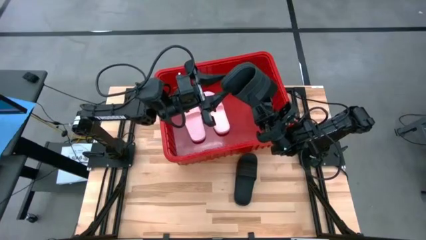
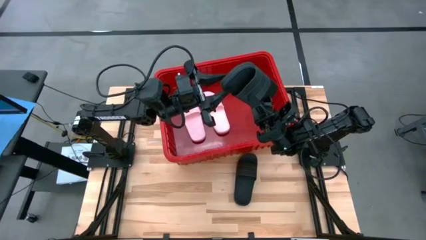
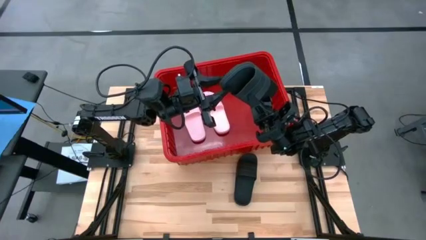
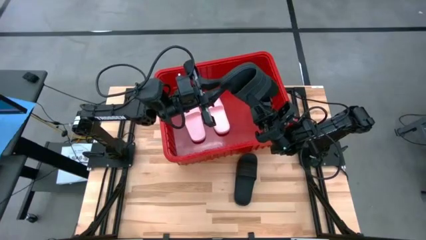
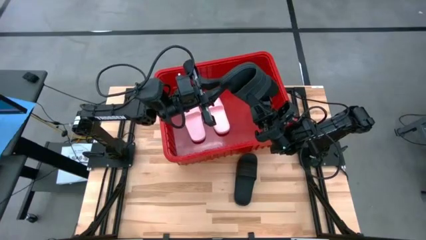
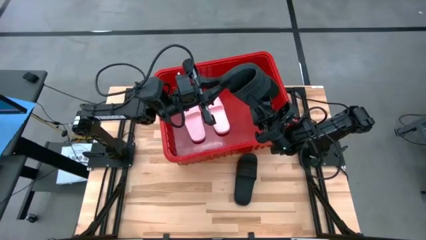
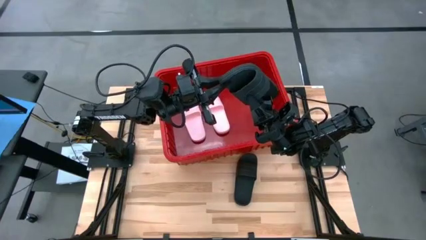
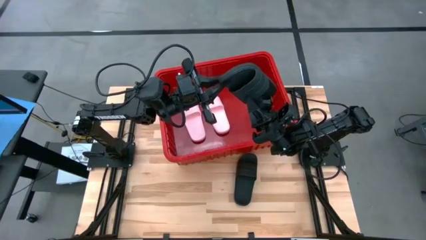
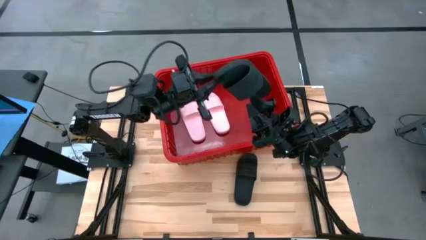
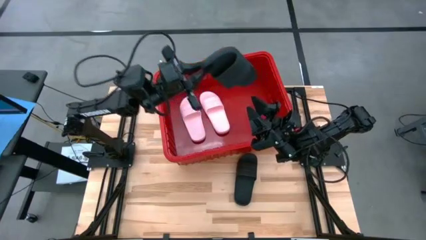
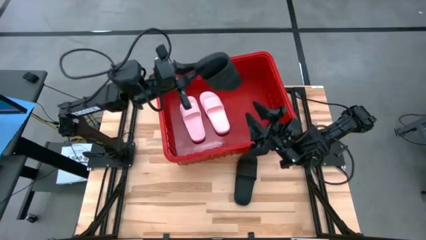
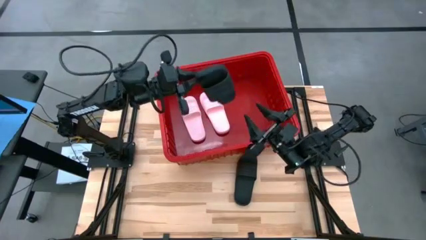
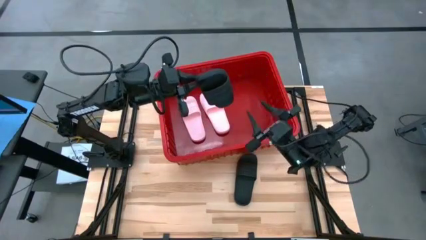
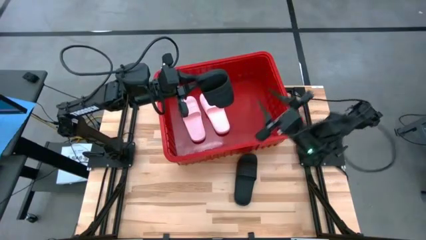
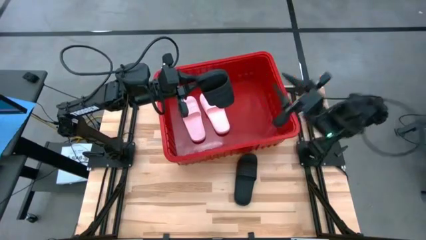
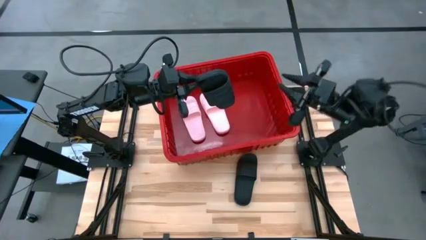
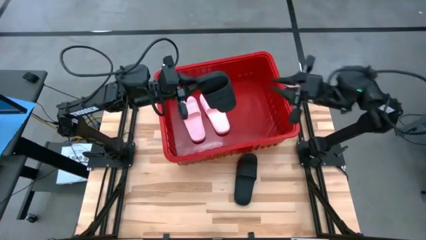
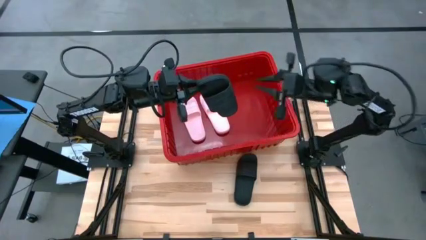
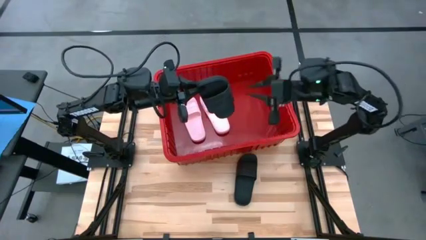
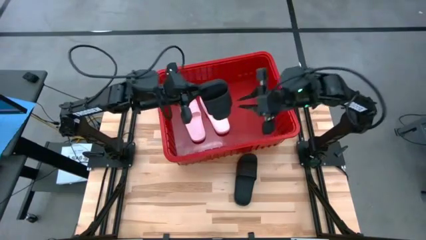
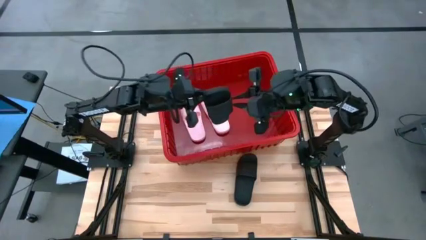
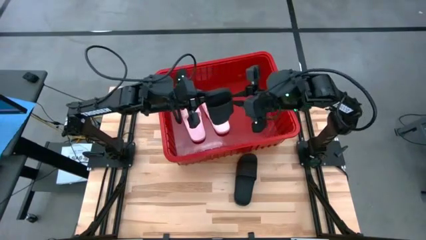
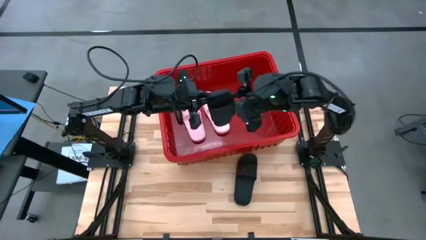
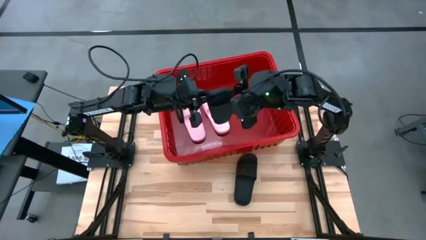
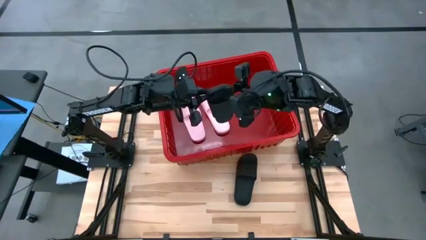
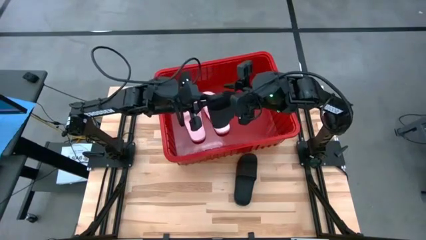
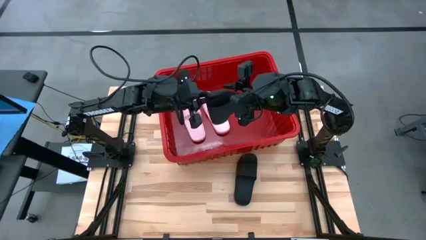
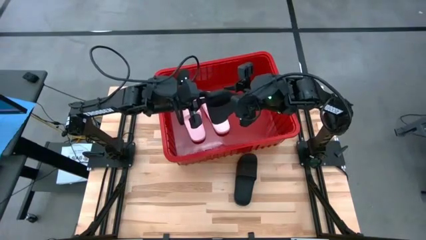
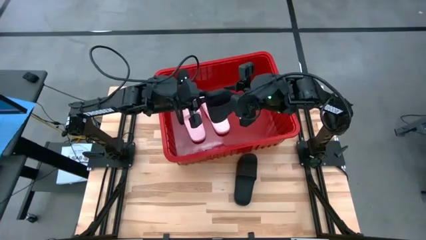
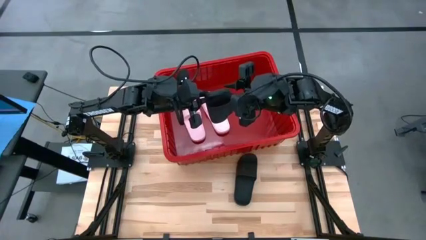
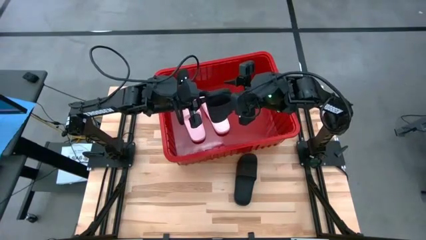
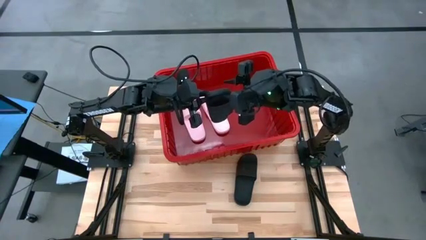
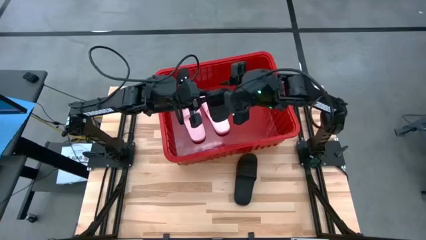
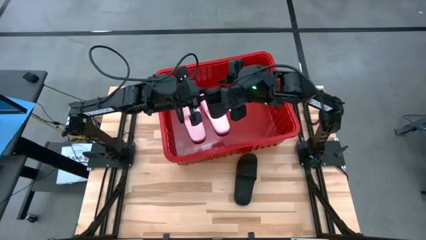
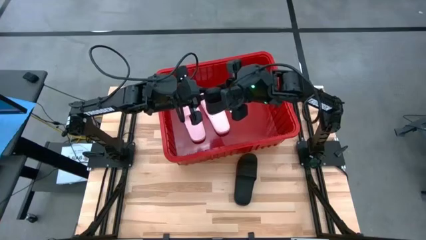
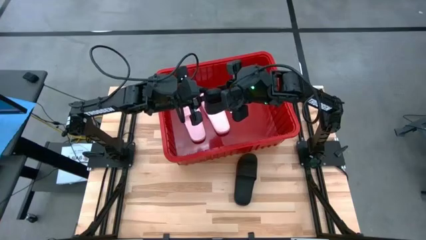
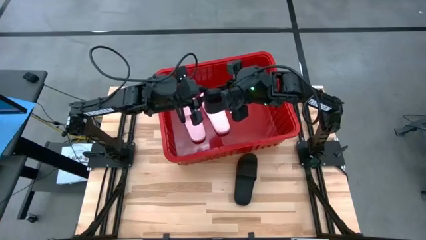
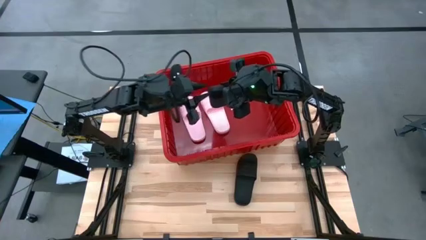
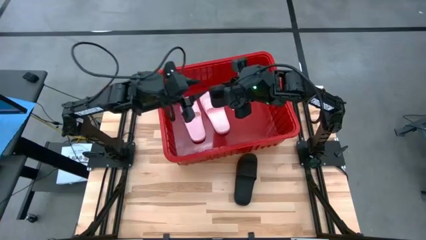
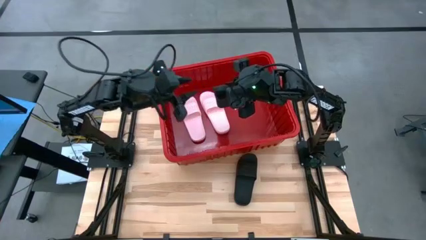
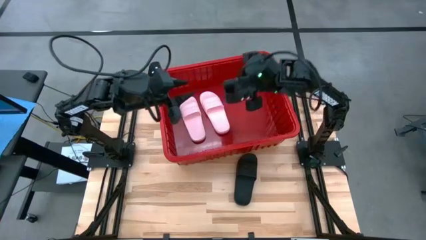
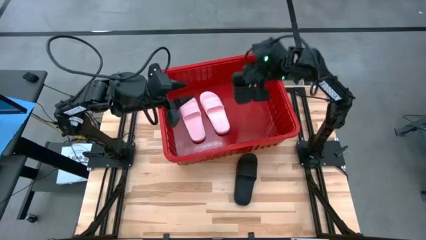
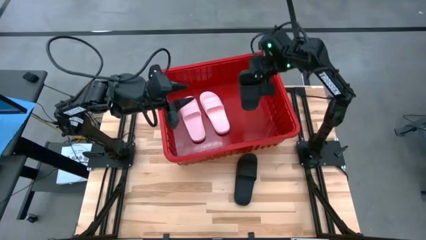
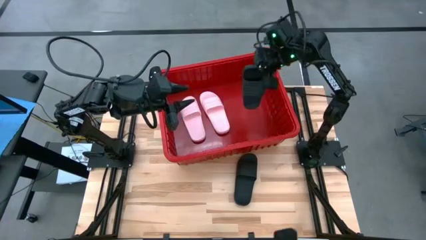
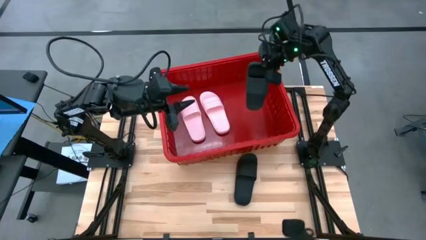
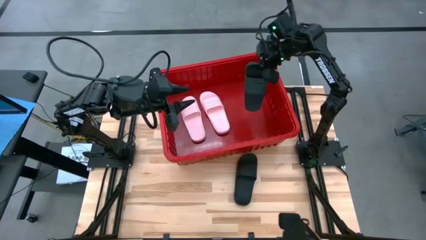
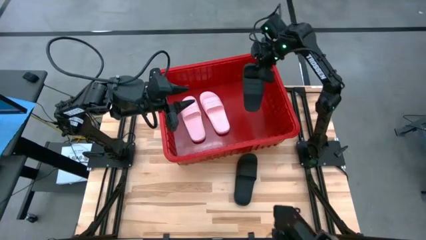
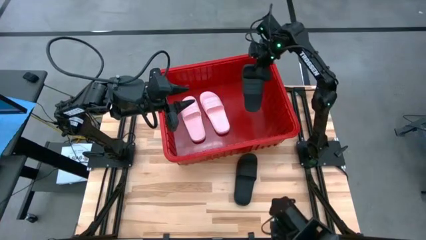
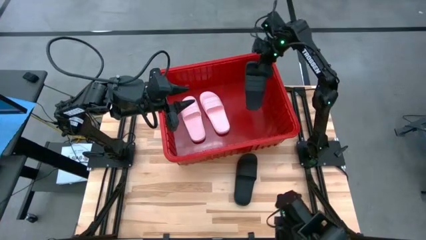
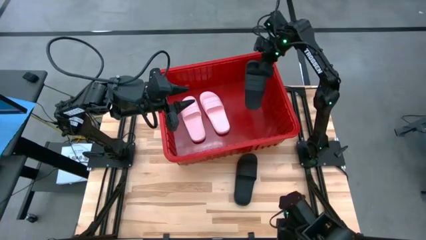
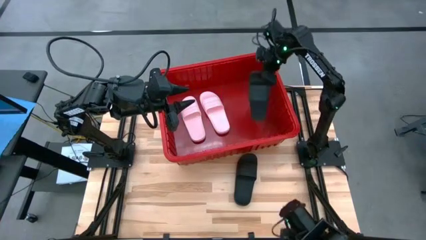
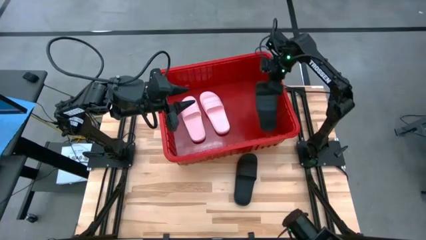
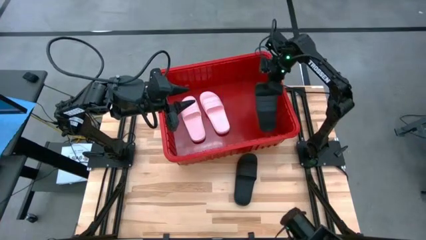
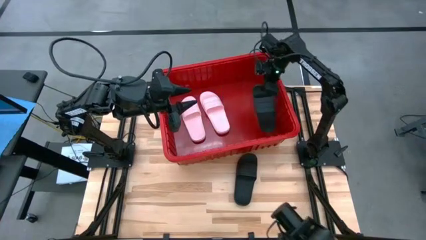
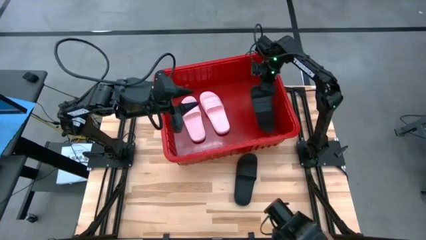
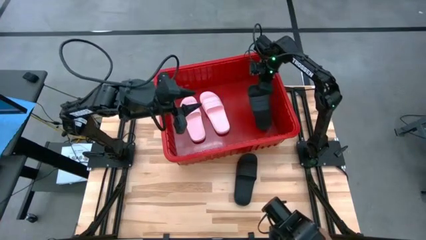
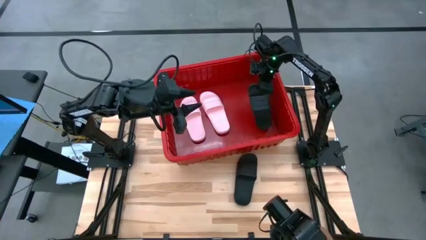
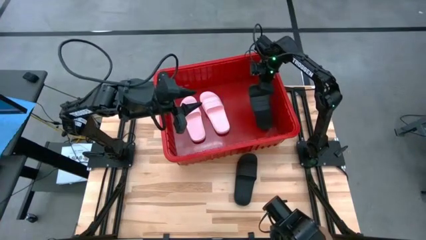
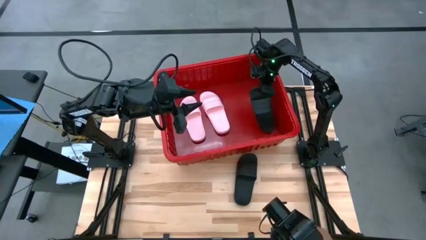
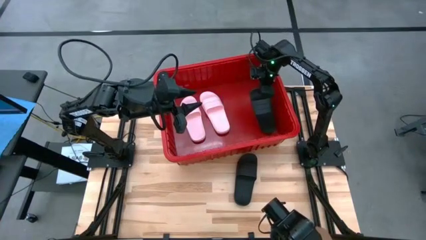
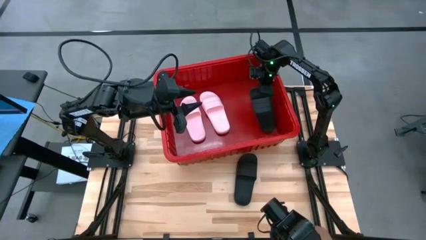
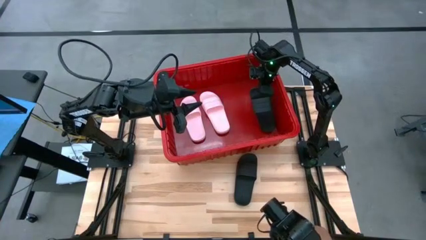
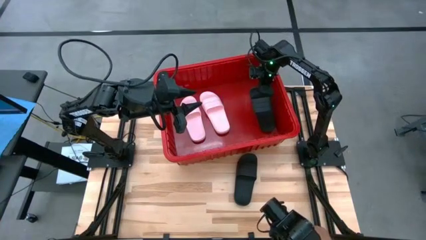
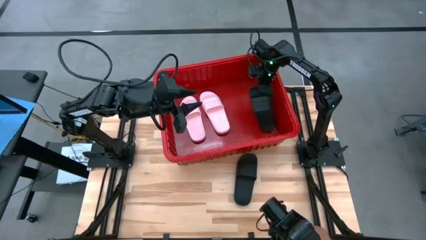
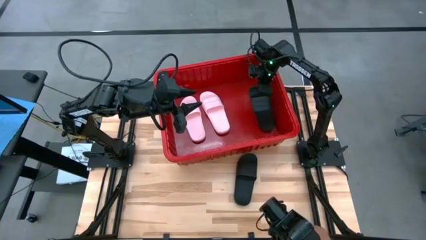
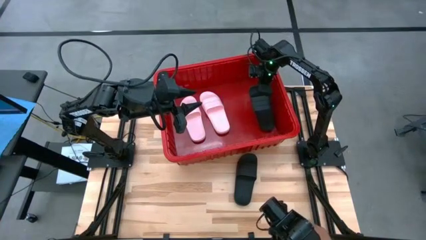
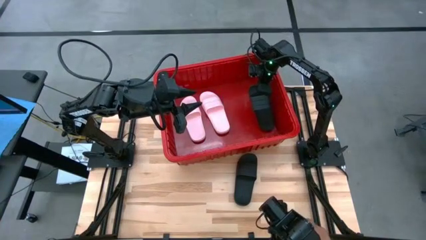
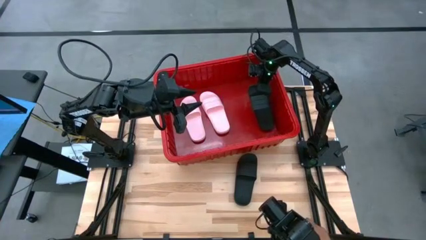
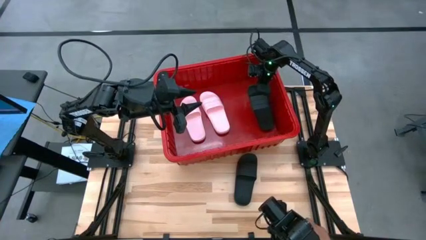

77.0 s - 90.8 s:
Task: Pick and place slides into bin
Put the bottom black slipper in the red bin

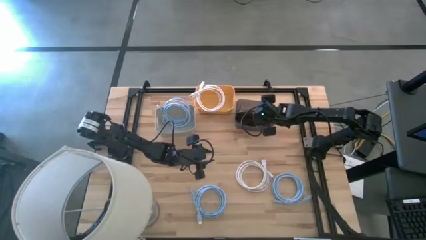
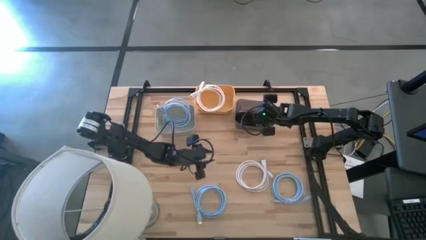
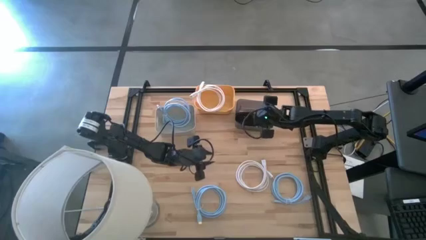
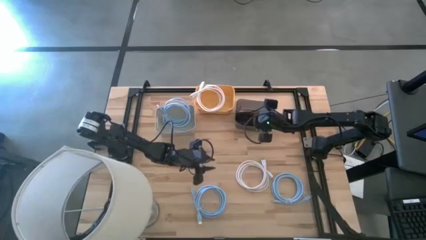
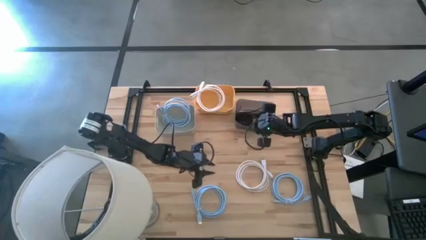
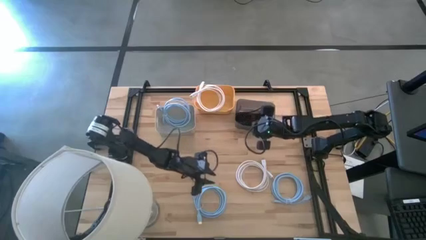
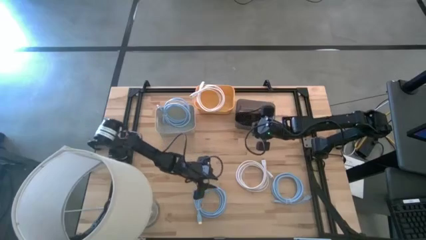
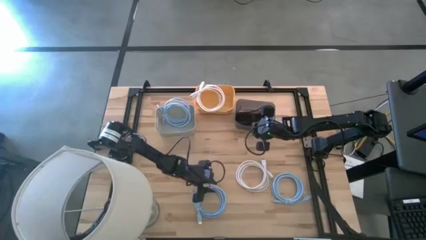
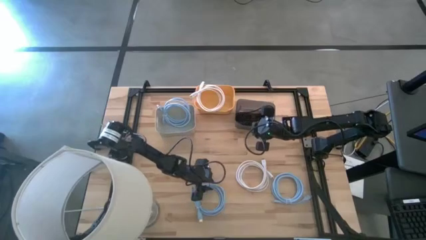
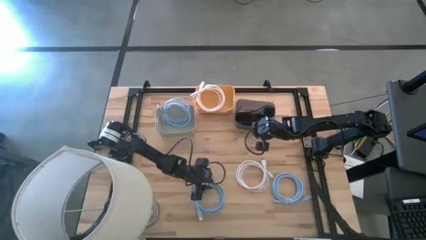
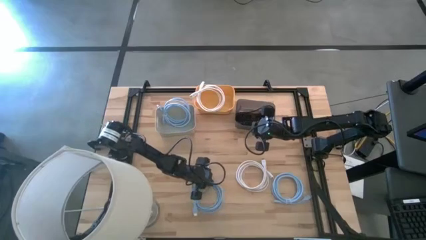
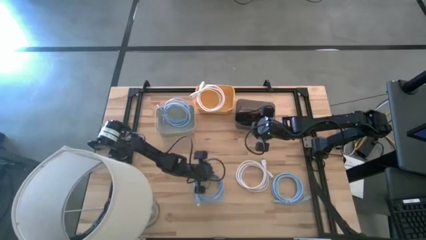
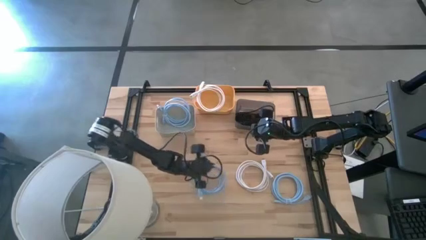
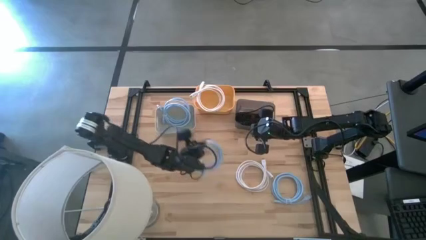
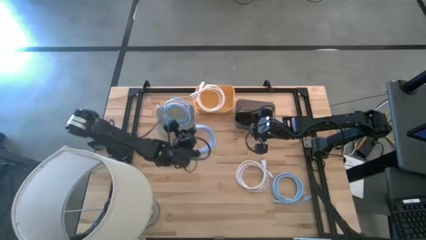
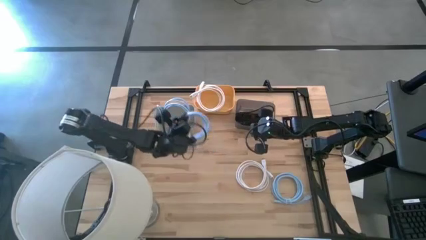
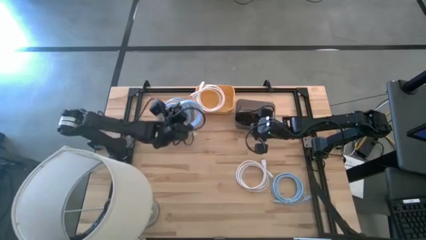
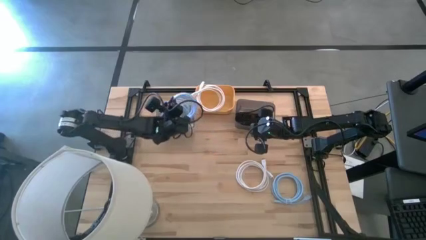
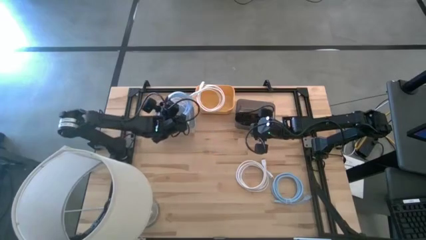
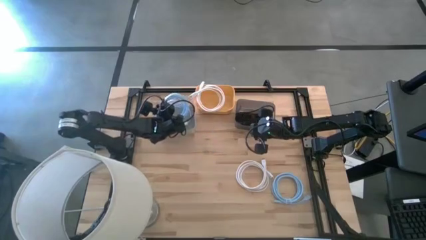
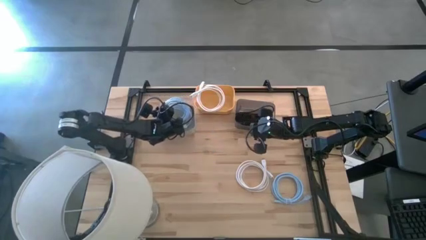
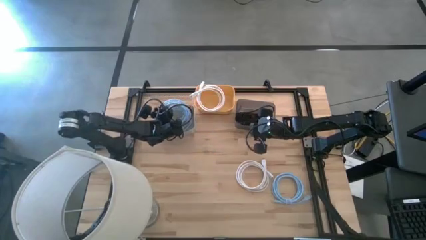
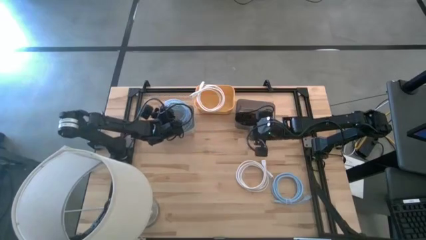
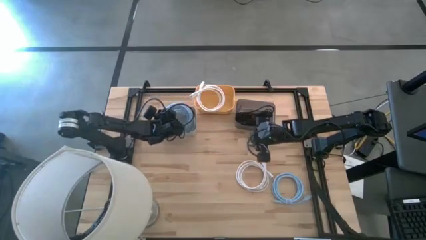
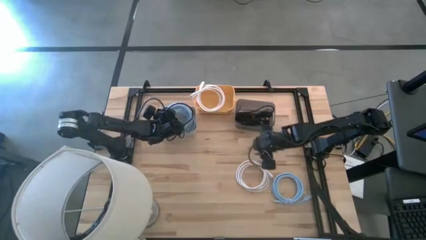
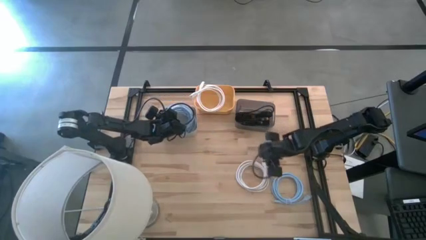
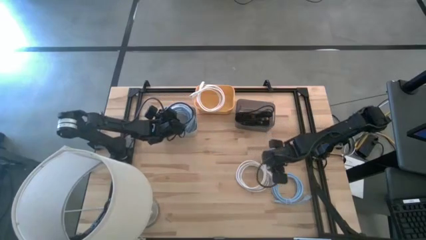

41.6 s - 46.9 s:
Task: Pick & Place USB Port
Put the left light blue hdmi cable into the gray bin
